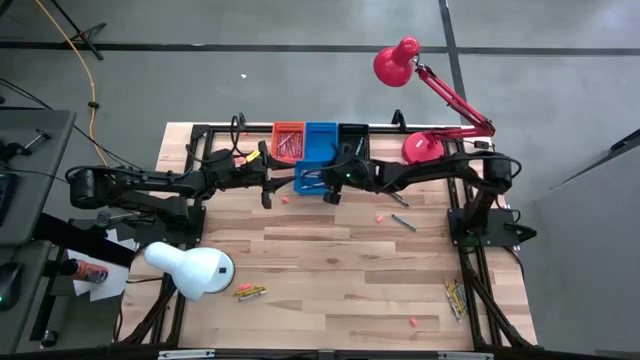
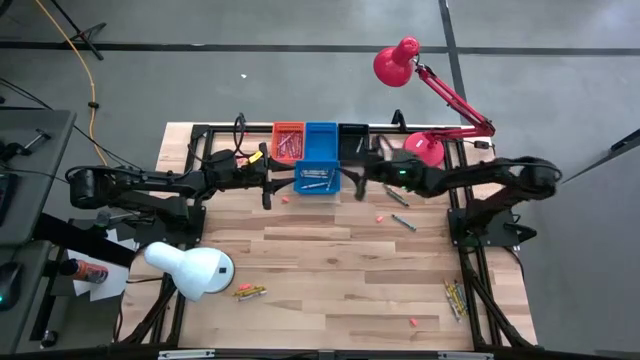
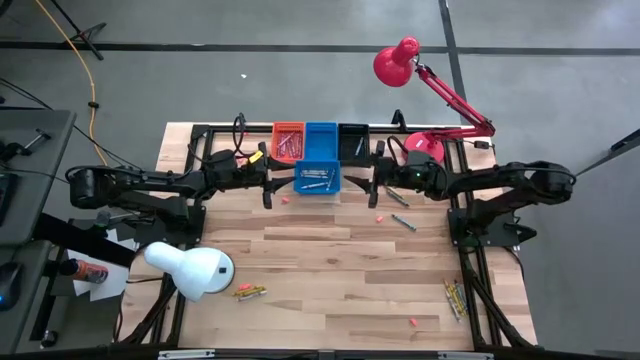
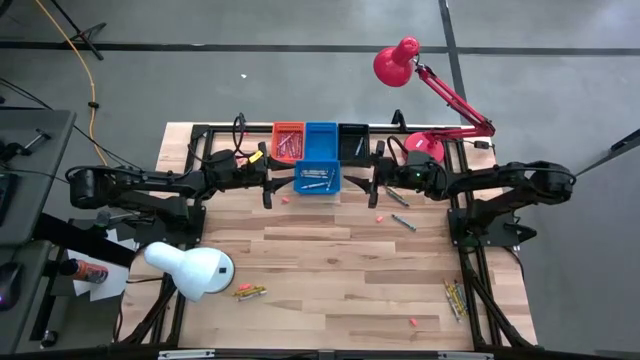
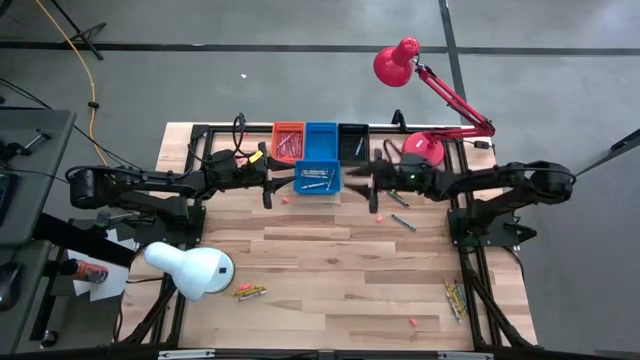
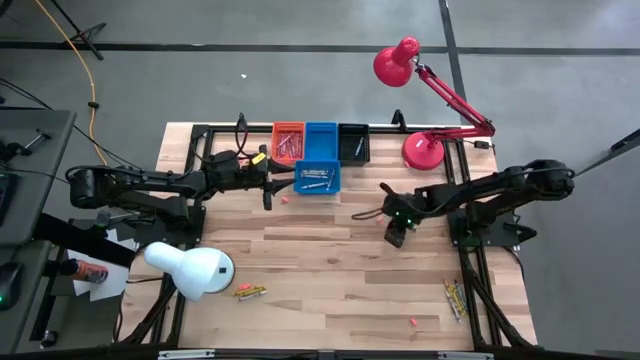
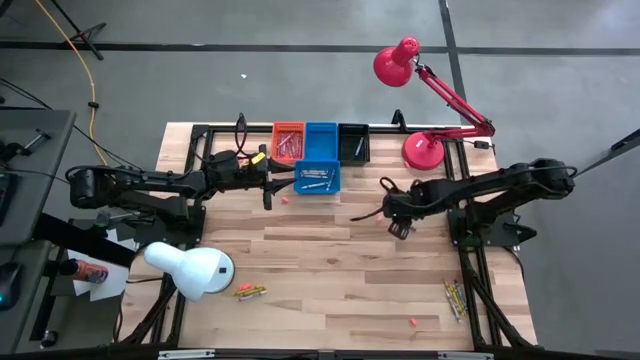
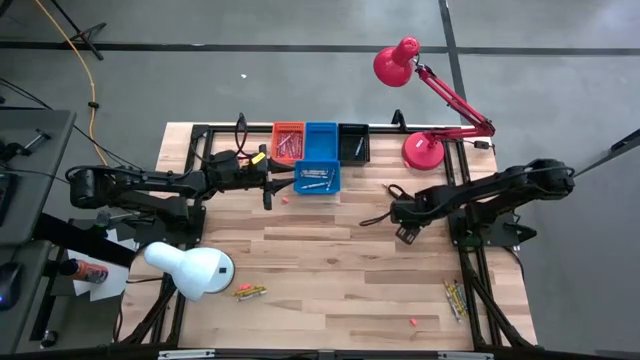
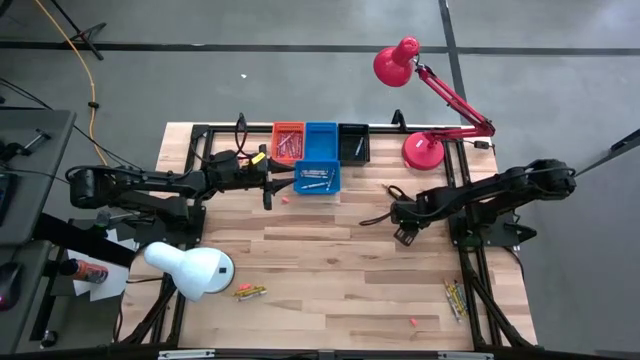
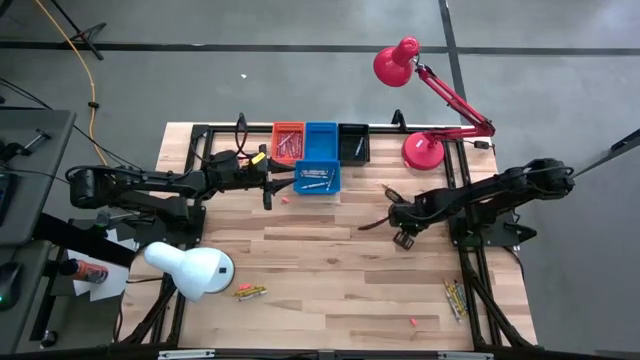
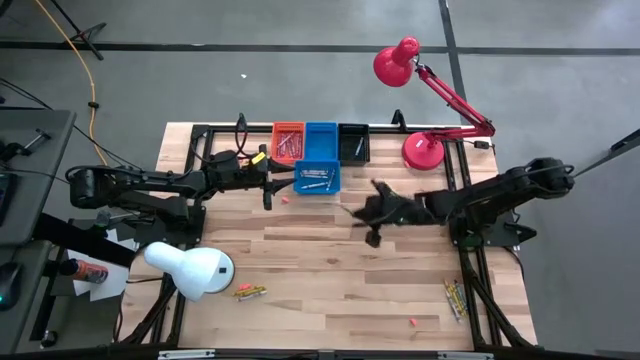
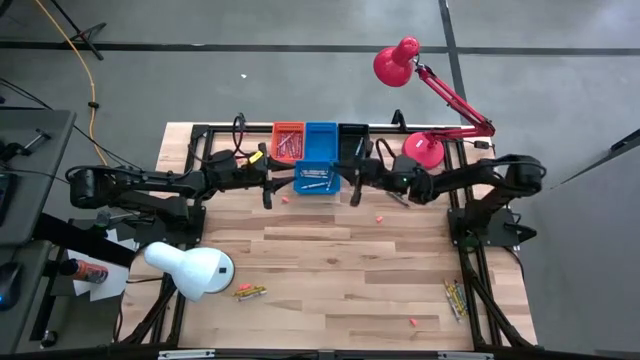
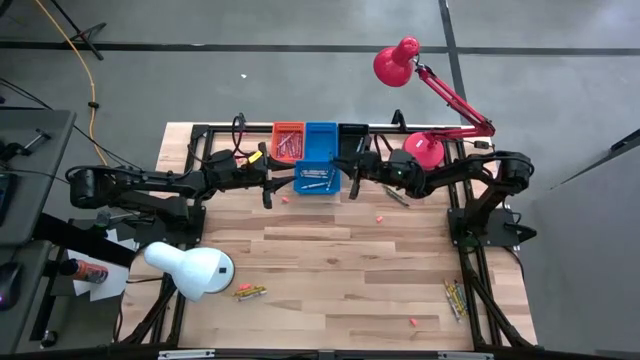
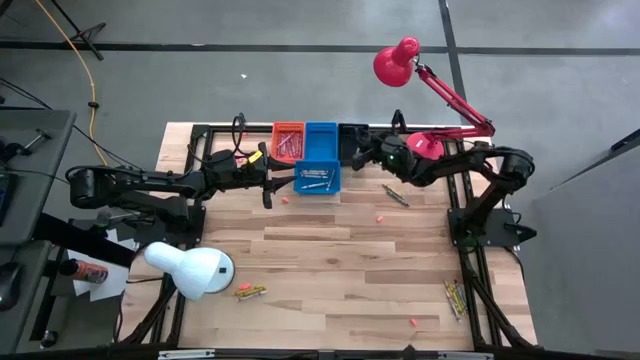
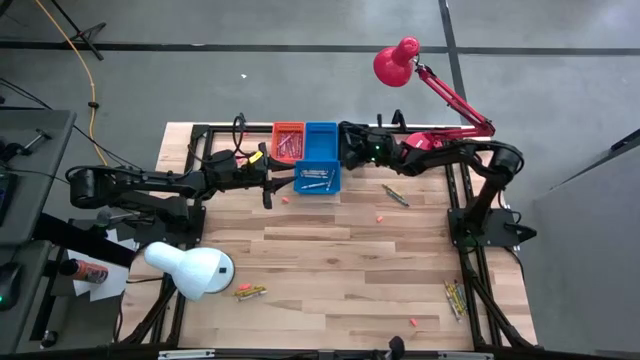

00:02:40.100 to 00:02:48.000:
Task: Sort crayons
Put the blue crayon into the black bin

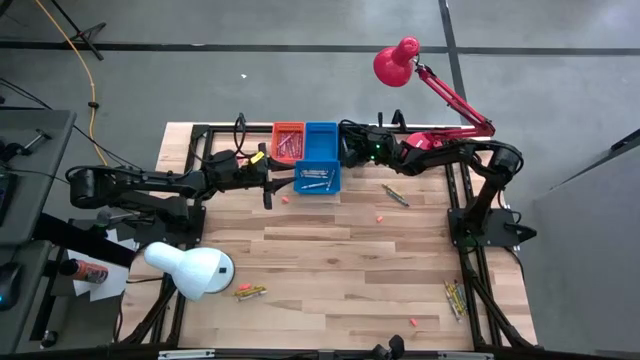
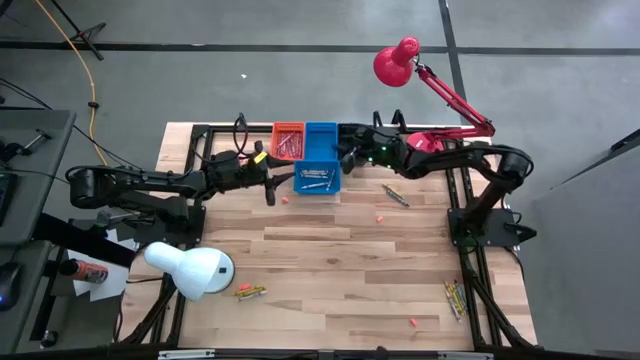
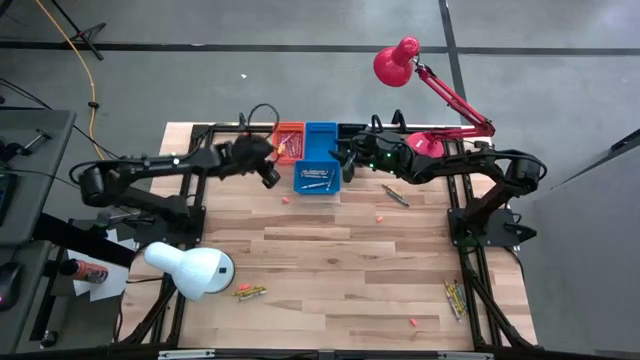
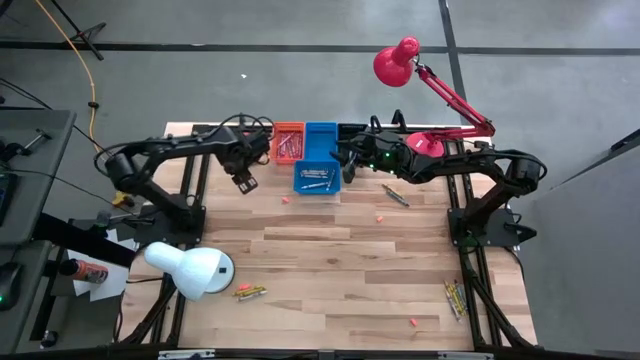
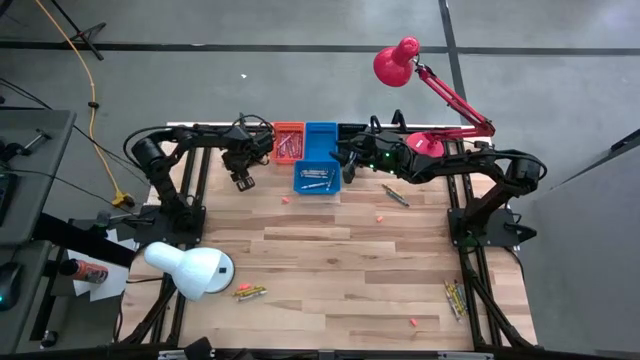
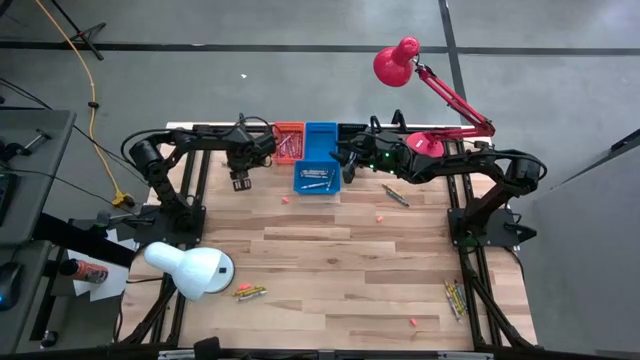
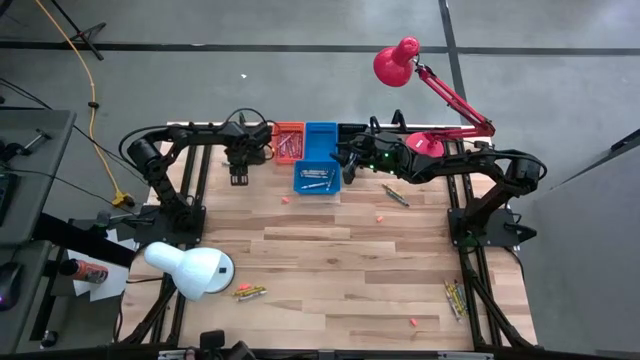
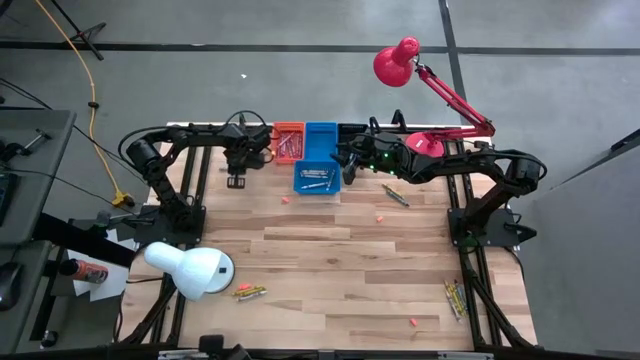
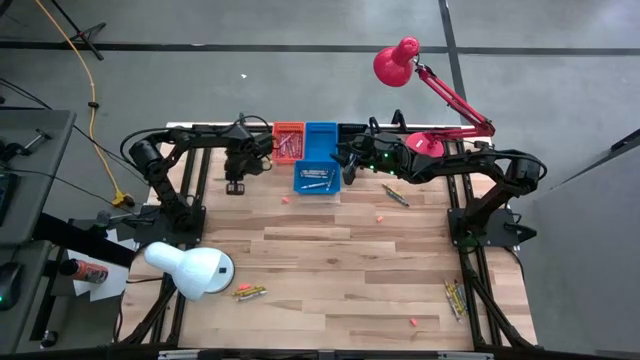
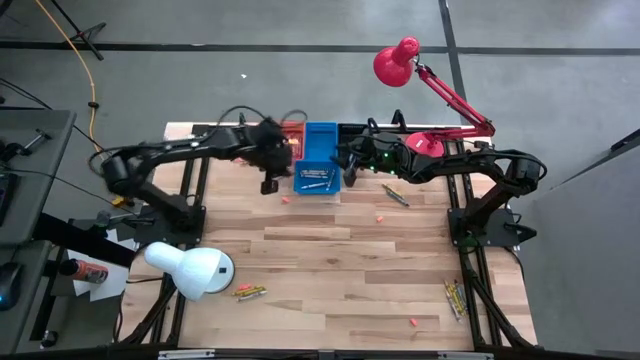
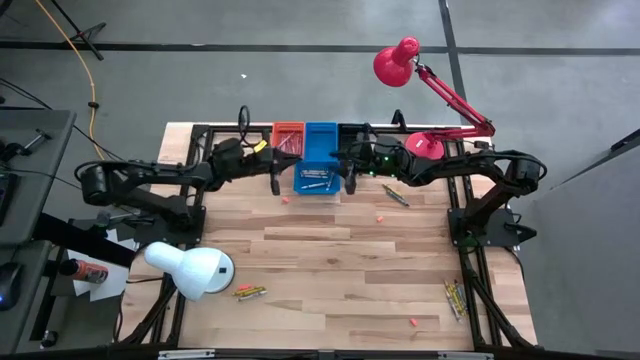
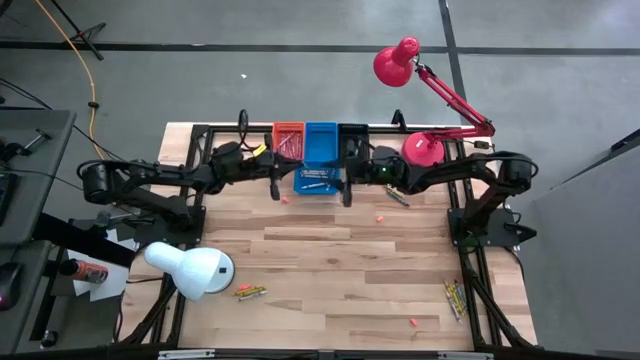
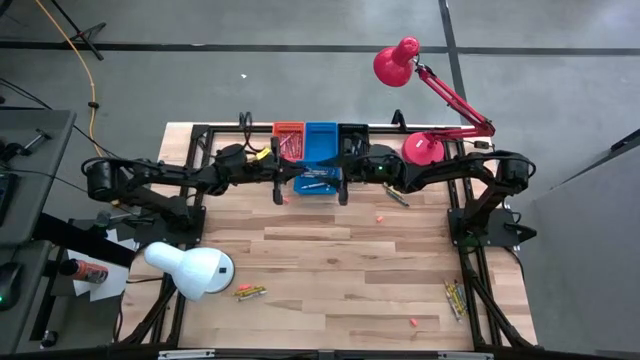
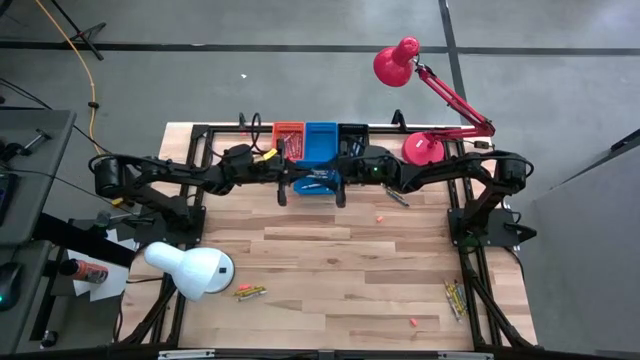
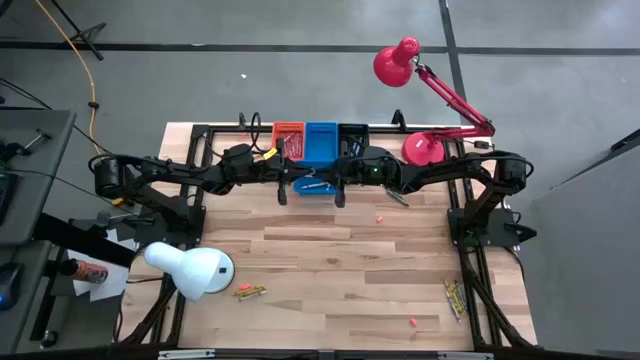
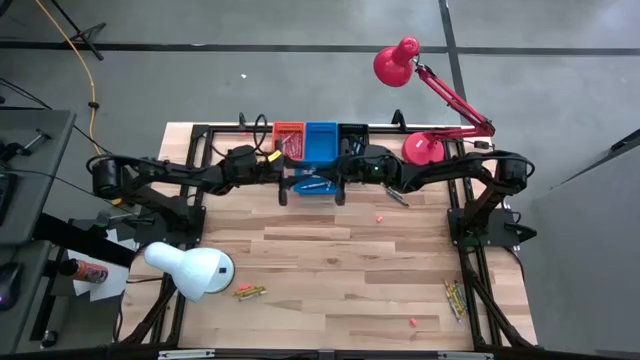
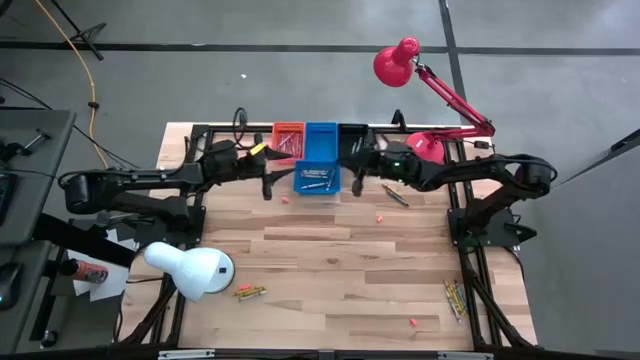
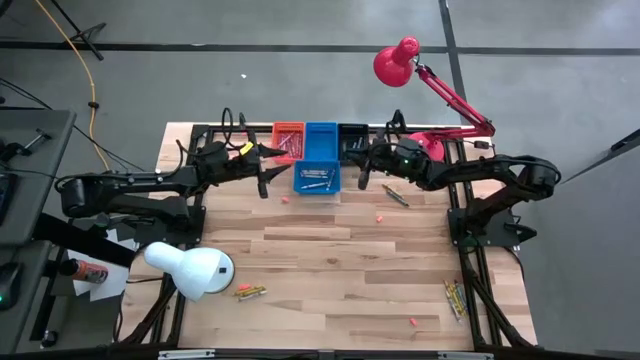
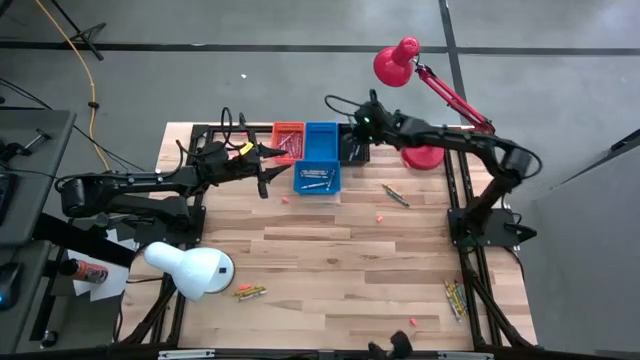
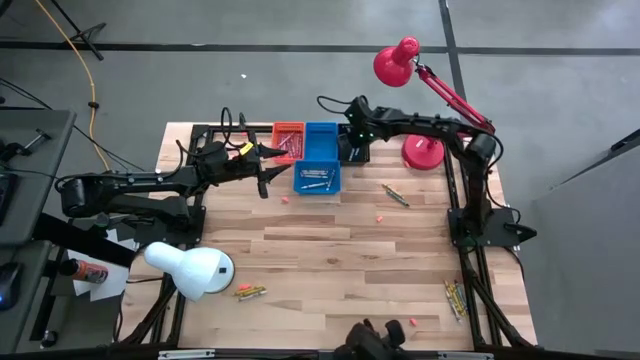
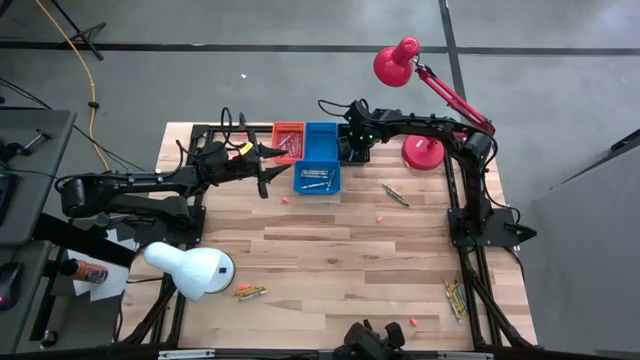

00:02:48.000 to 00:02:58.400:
Put the blue crayon into the black bin

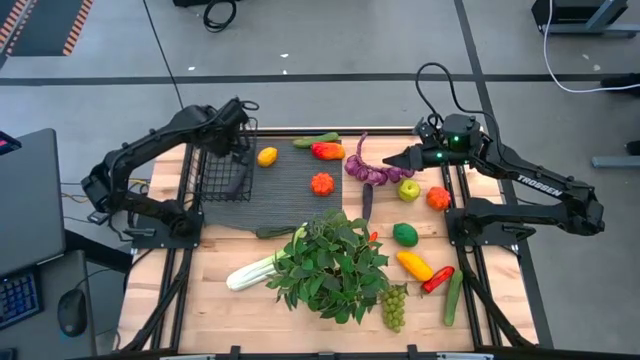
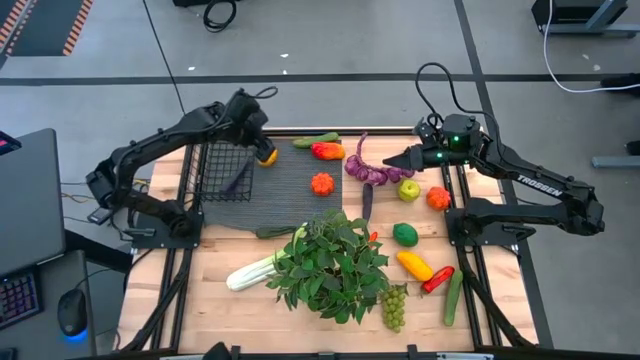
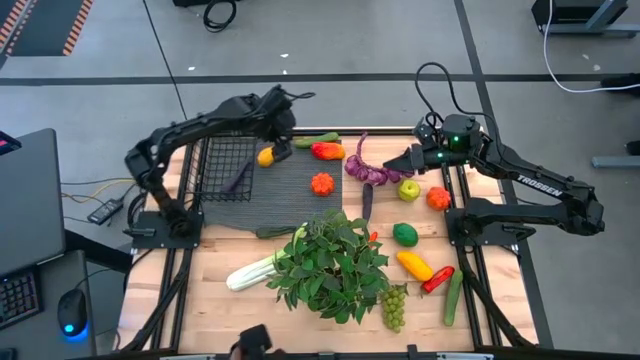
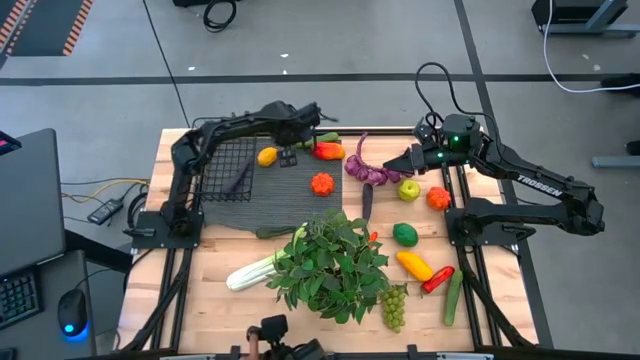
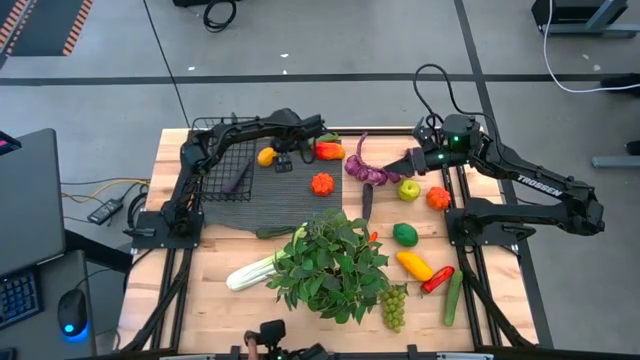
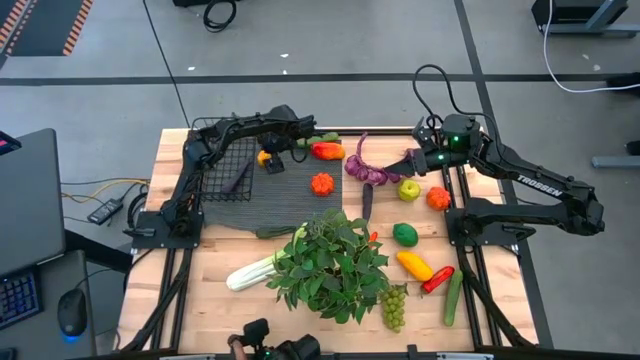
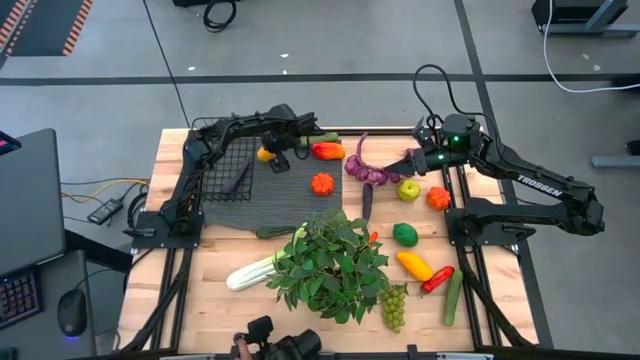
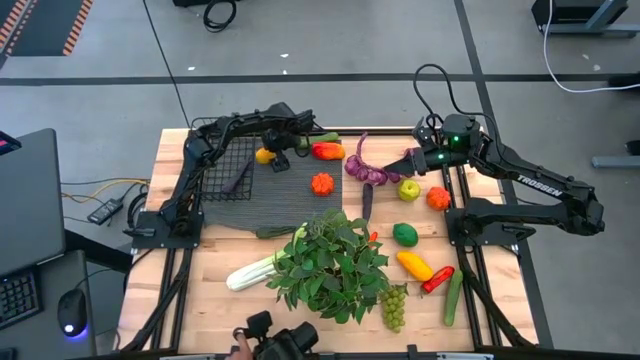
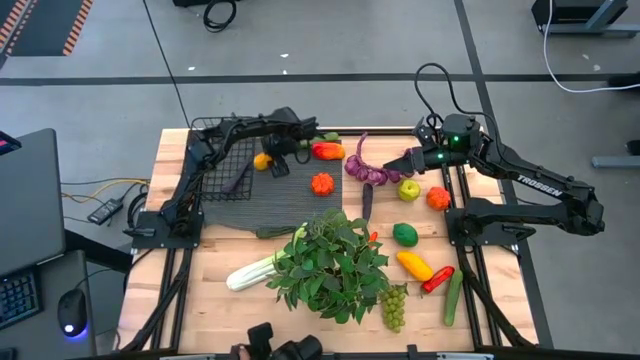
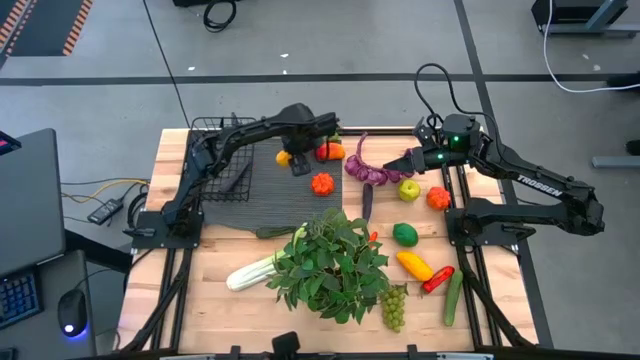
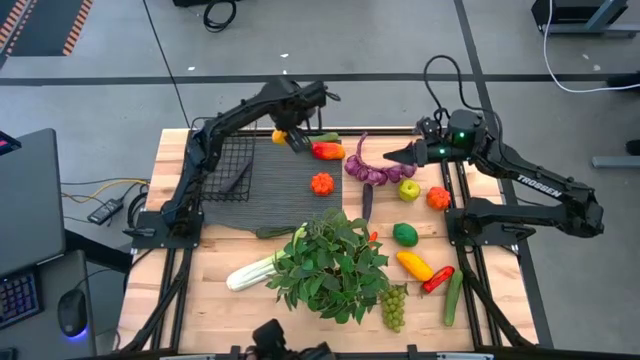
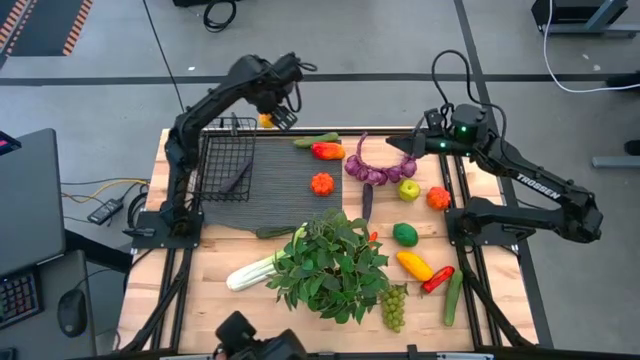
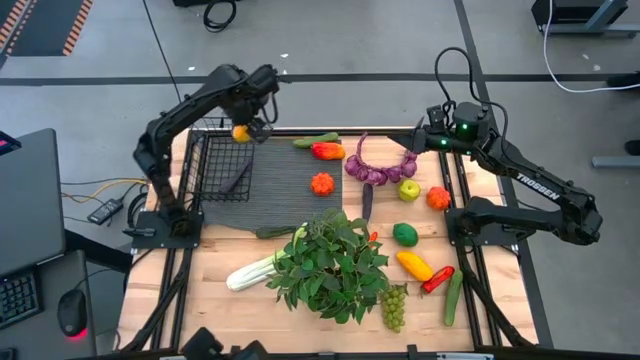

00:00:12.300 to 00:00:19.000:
Task: Build produce basket
Put the yellow lemon into the wire basket
